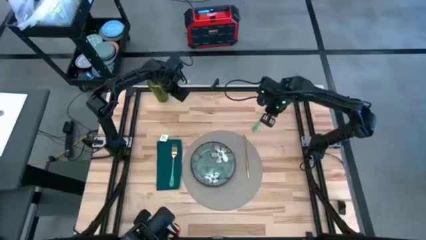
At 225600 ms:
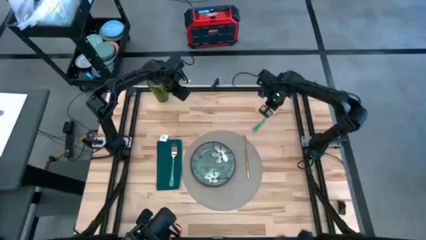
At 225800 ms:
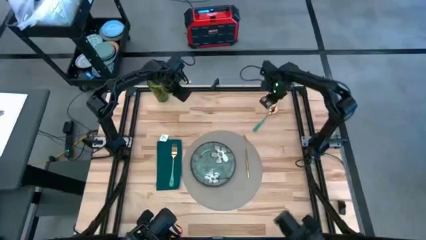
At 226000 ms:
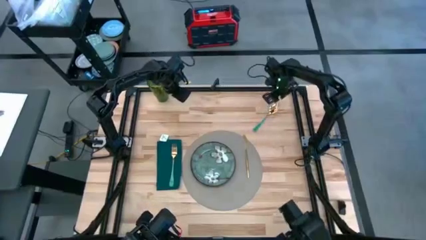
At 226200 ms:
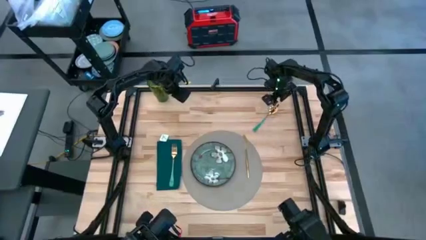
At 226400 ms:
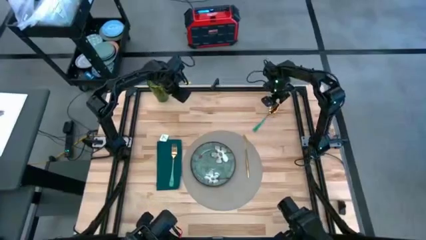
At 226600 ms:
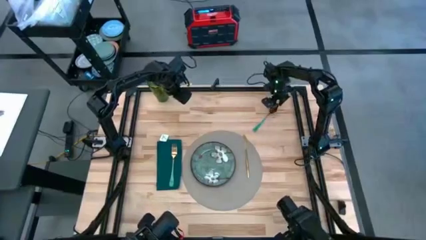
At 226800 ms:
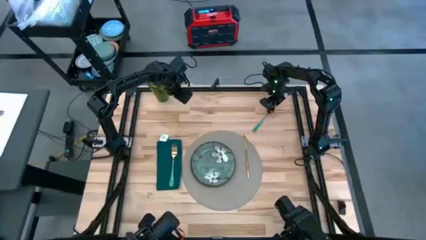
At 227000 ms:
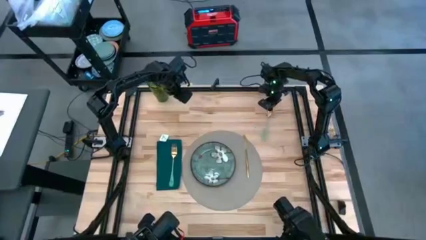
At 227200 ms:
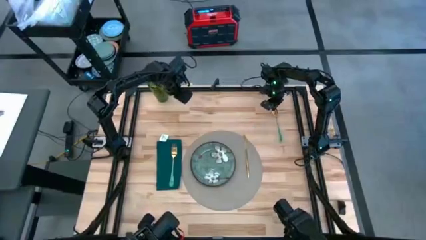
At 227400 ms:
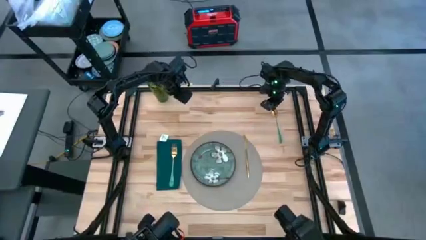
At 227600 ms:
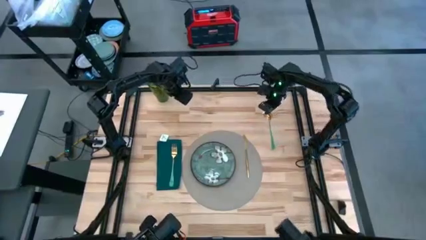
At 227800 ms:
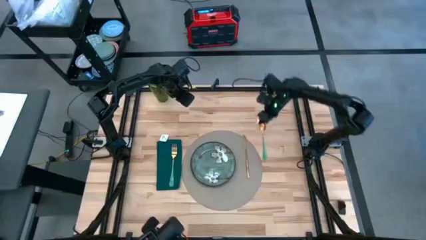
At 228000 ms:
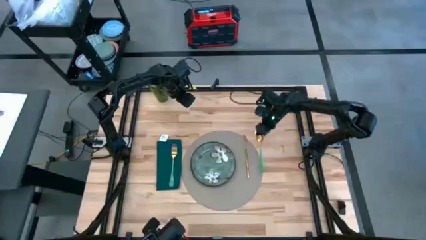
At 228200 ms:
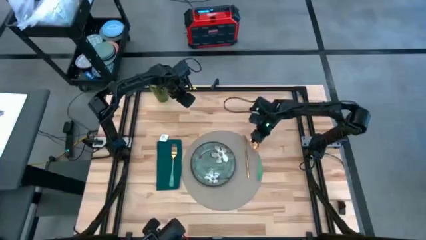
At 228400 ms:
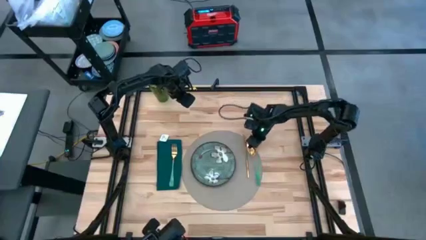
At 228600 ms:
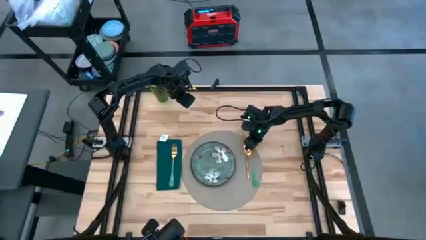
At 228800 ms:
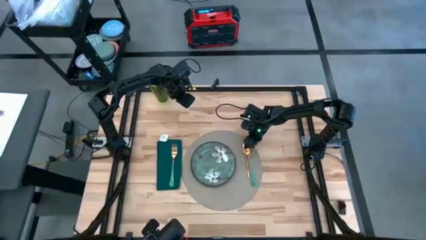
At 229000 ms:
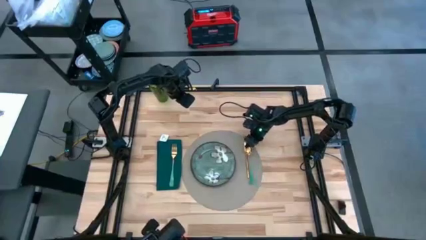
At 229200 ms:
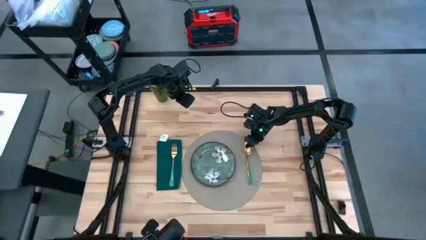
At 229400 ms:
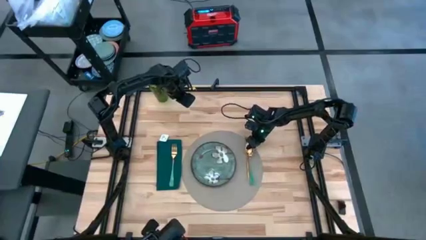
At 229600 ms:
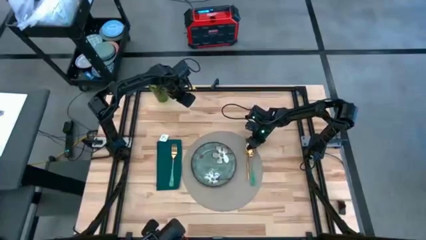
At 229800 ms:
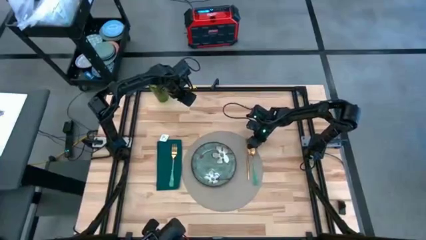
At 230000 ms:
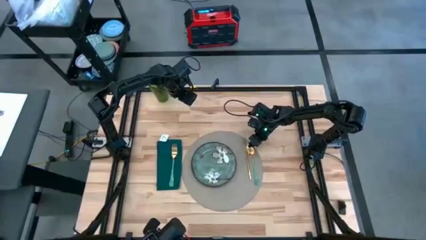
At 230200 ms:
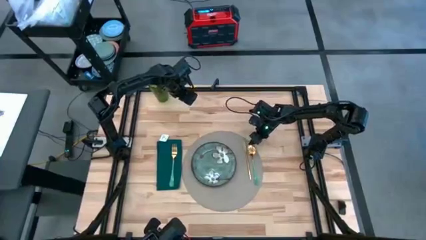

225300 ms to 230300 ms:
Task: Set table place
Put the green spoon on the gray table mat

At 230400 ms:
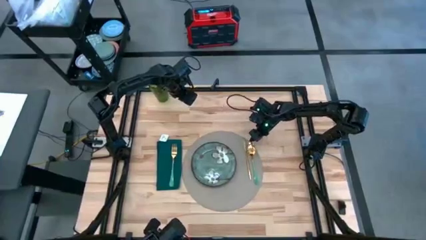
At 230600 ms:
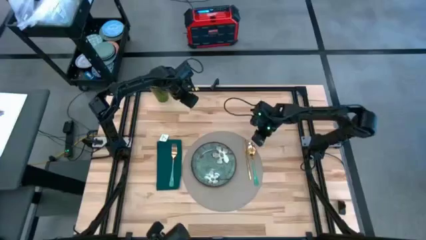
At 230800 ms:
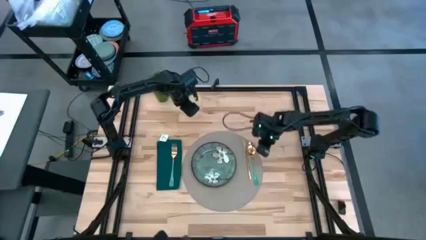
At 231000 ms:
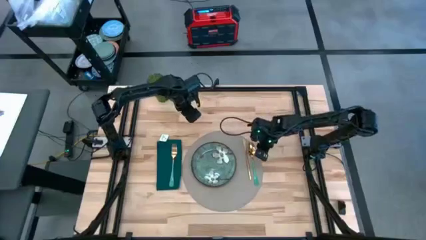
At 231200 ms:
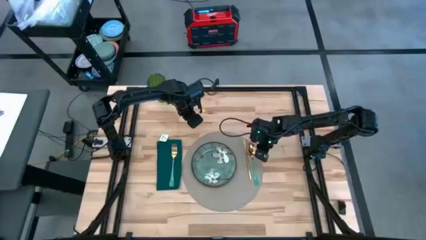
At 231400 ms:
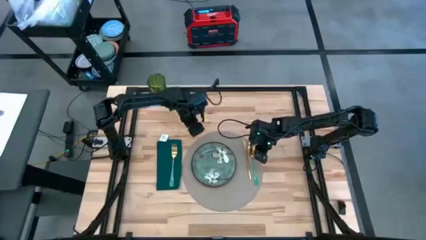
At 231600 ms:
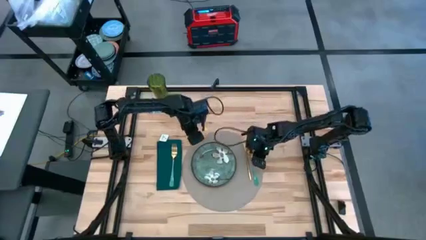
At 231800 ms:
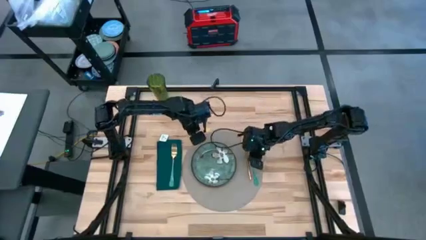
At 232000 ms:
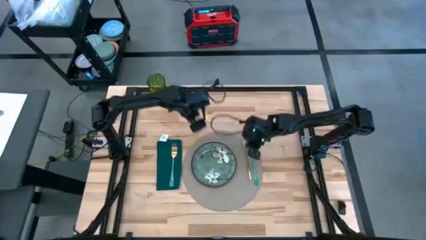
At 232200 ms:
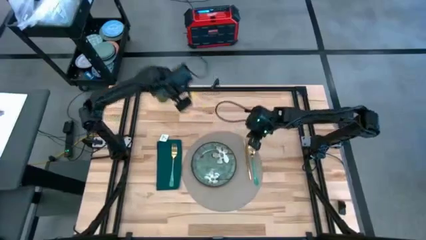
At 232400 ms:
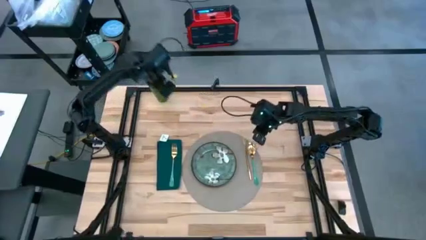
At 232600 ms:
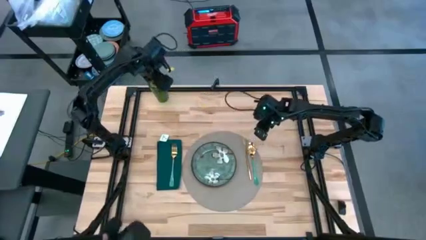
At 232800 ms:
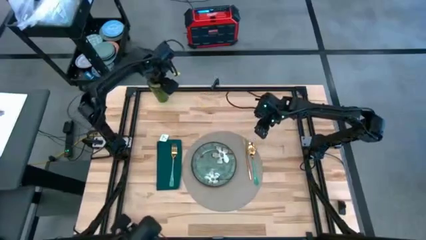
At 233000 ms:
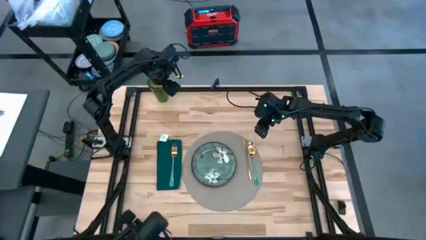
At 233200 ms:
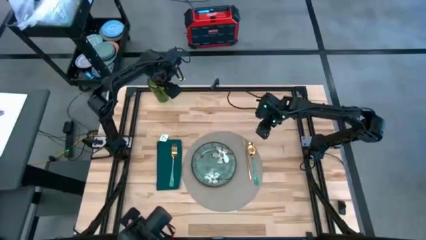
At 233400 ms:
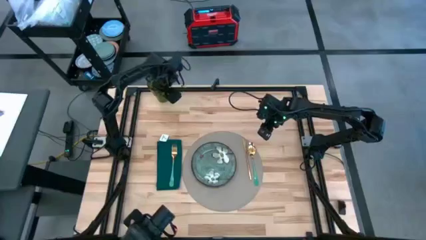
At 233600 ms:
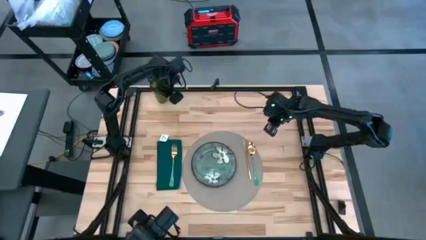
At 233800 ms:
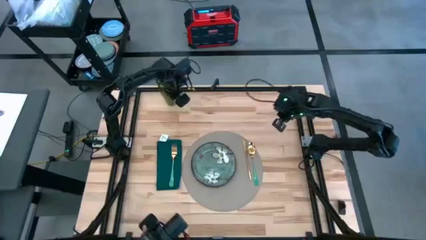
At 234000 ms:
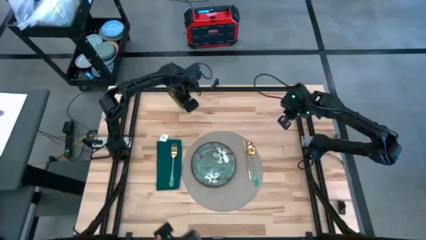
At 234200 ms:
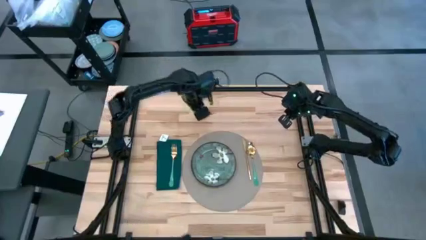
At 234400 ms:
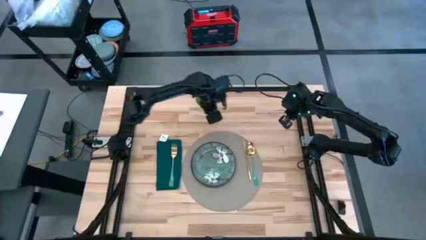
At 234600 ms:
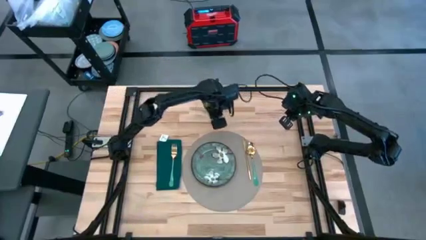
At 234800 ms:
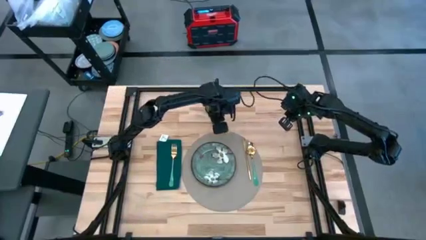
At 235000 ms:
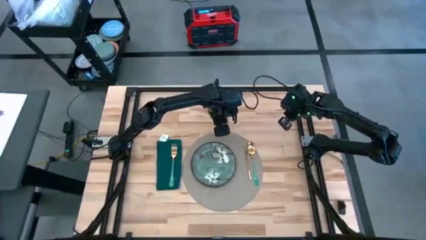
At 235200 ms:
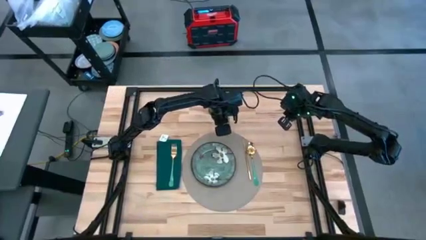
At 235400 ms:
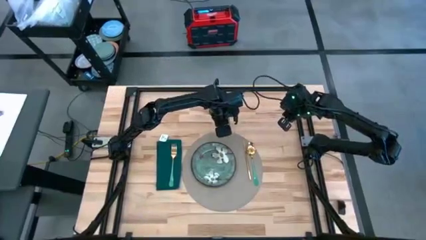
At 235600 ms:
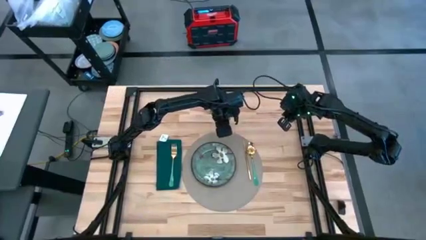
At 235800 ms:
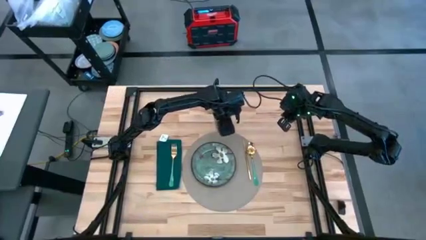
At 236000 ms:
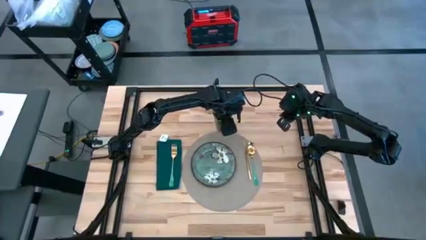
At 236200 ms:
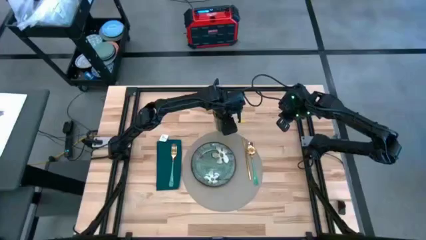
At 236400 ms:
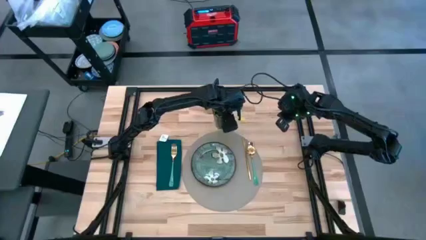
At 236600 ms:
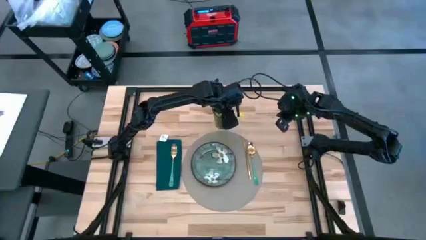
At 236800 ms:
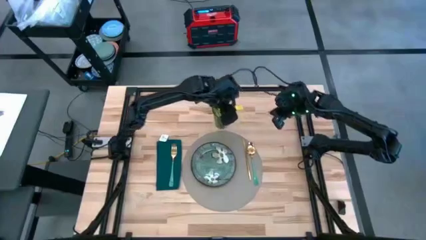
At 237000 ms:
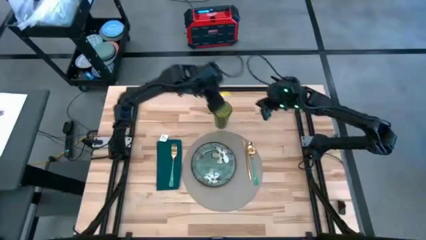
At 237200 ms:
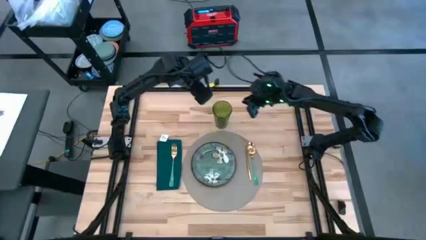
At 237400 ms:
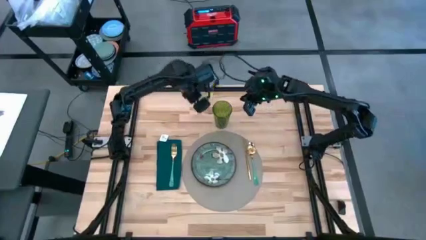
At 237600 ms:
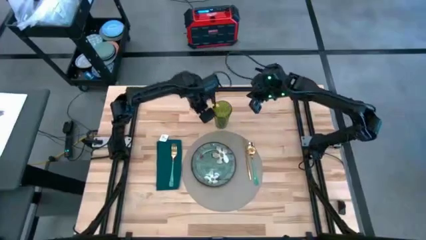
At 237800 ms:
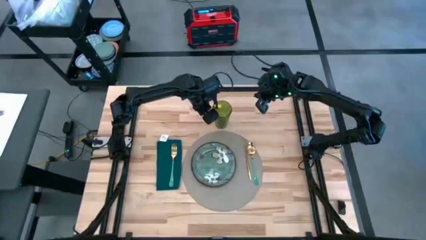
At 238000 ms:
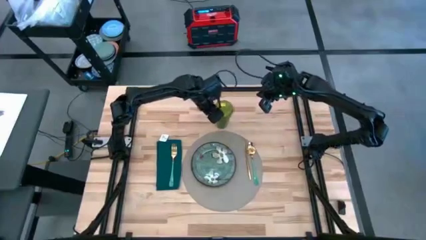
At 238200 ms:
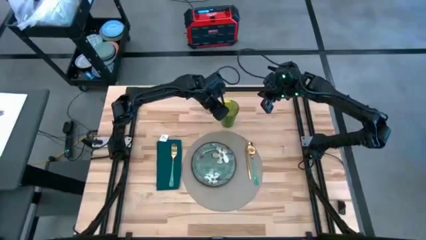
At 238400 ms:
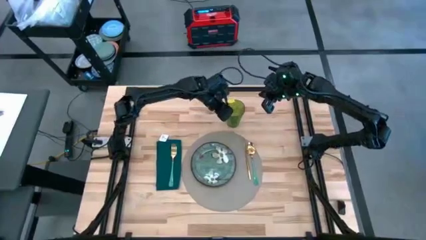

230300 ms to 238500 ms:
Move the green cup to the top center of the table

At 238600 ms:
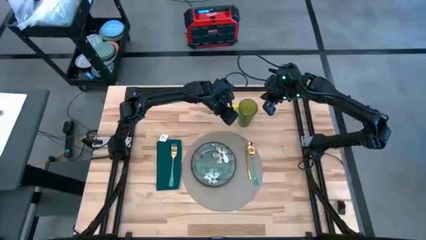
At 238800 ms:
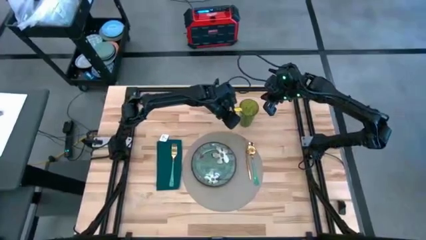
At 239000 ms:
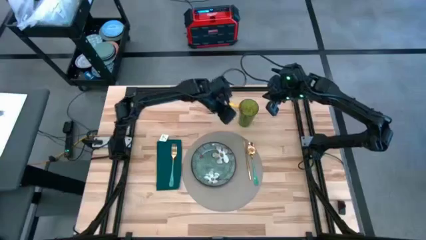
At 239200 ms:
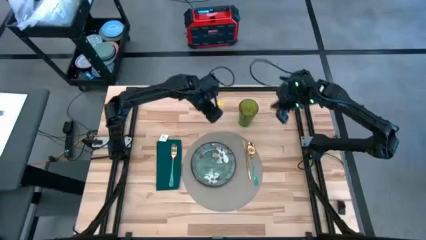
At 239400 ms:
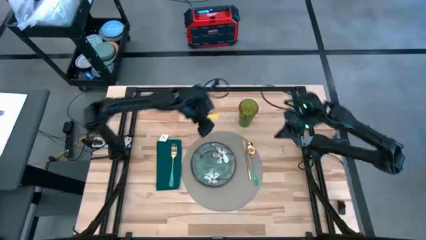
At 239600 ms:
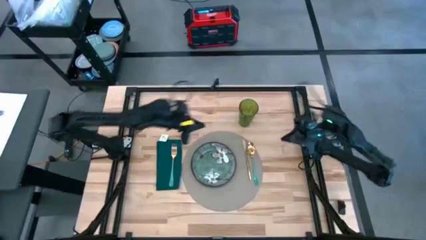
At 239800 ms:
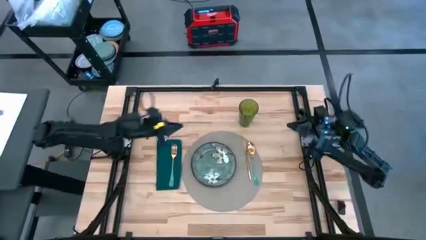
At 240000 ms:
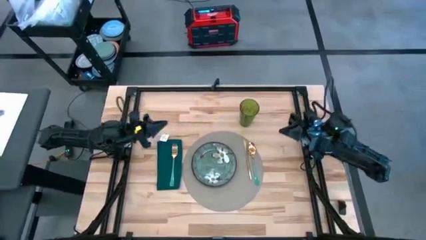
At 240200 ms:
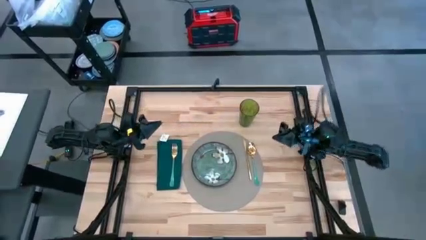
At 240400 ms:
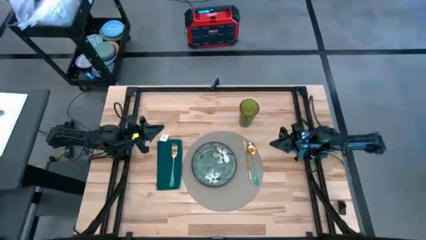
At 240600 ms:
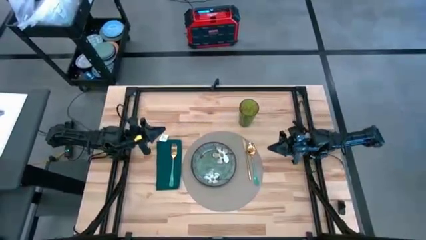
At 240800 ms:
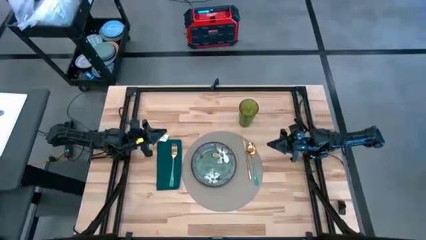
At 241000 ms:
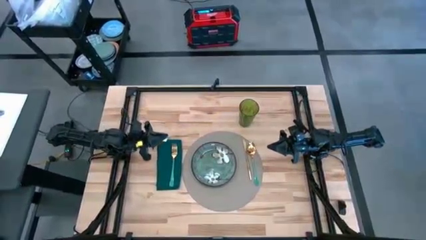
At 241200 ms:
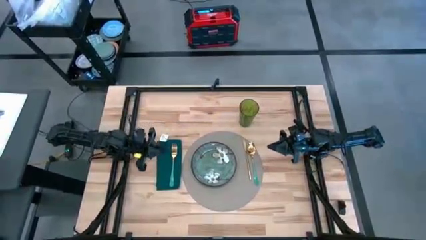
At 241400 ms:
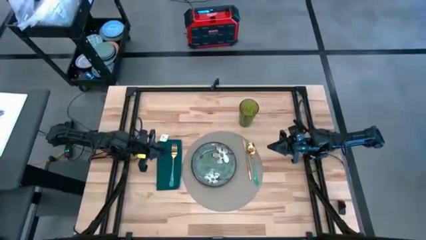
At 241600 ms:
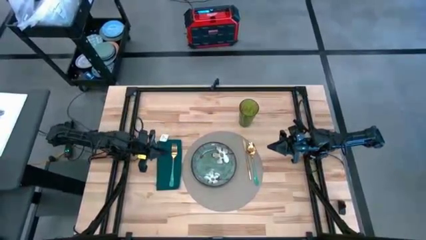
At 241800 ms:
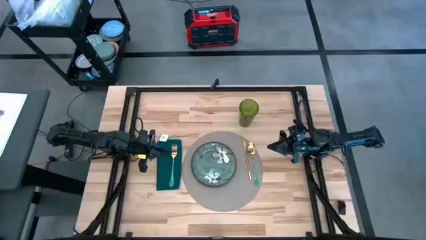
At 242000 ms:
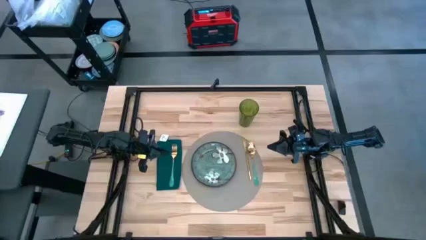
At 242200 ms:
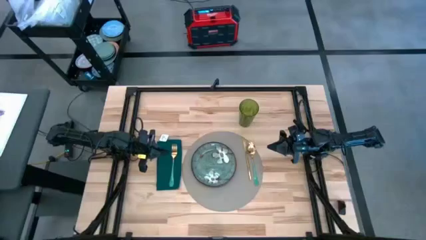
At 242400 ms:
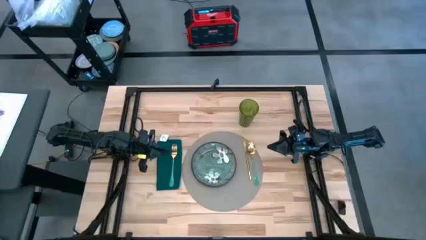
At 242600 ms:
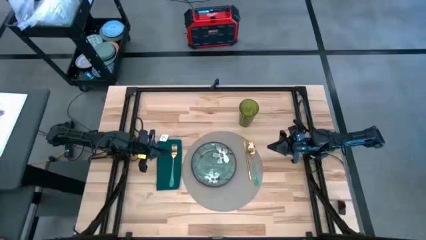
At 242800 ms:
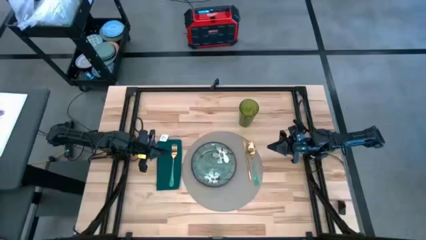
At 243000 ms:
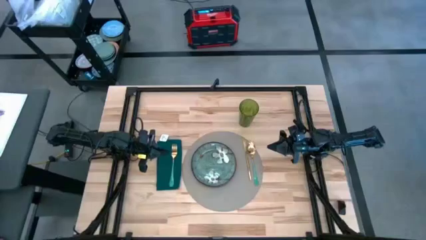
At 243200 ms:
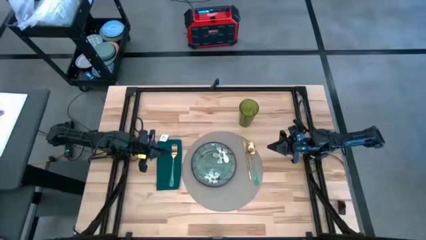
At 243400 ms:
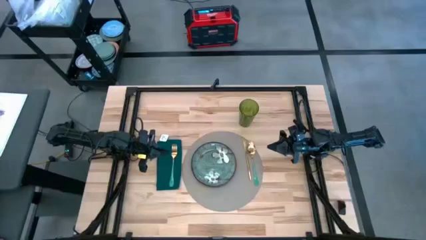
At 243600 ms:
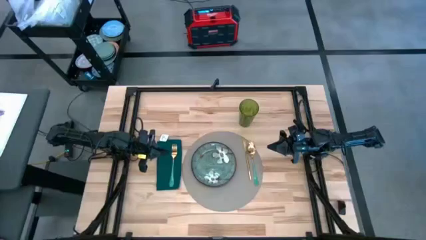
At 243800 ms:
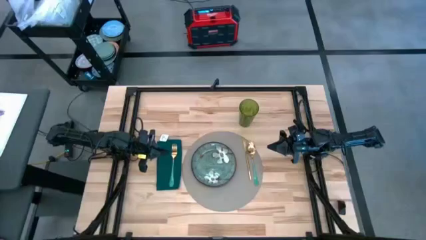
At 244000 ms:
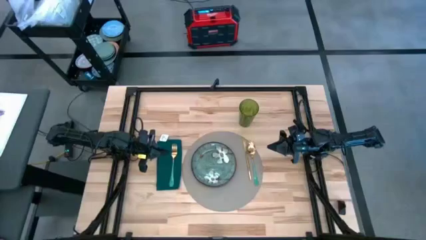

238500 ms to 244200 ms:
Return to Home Position
